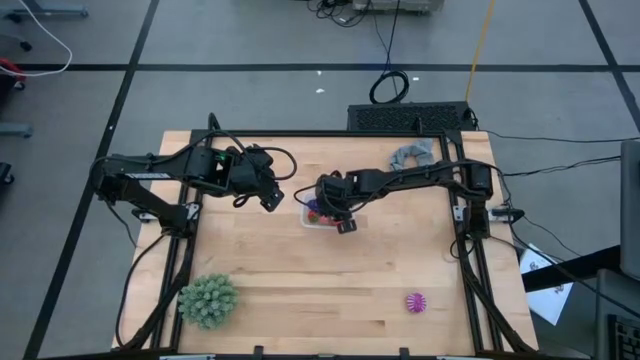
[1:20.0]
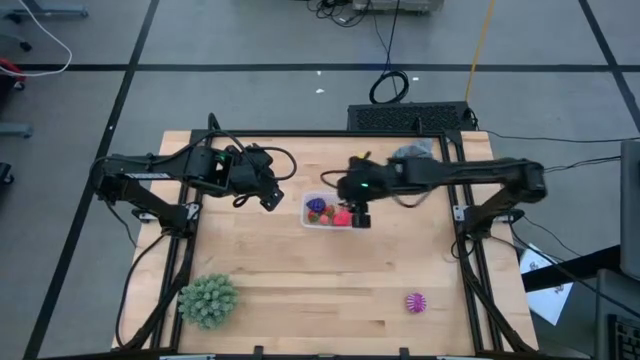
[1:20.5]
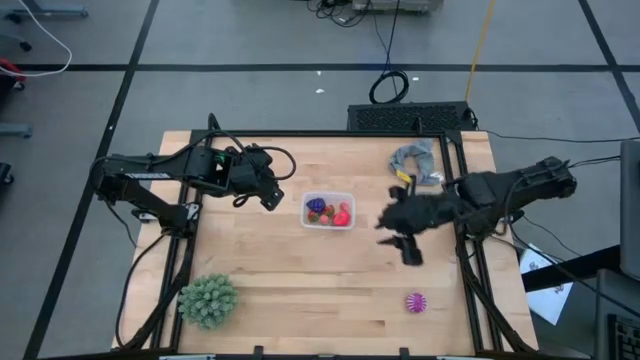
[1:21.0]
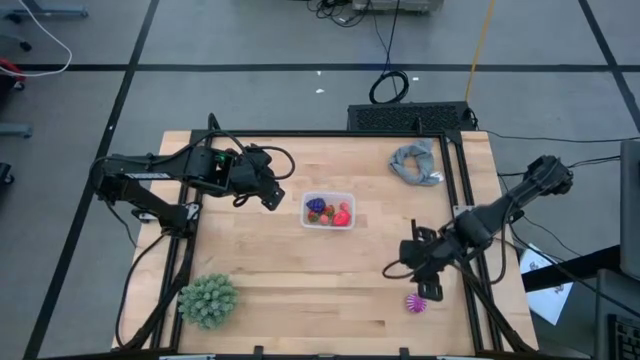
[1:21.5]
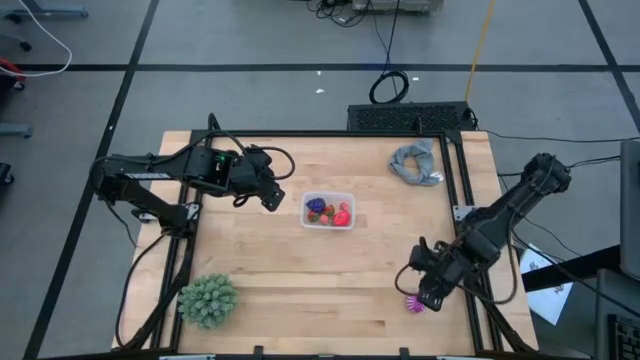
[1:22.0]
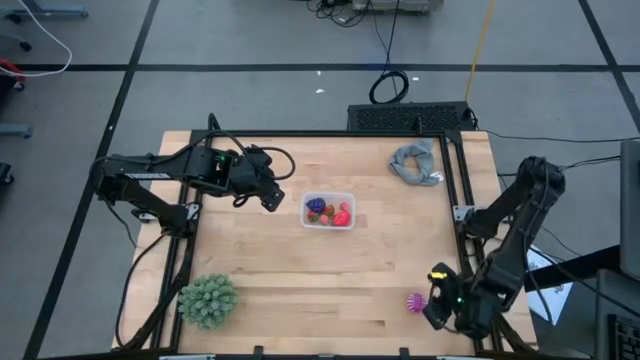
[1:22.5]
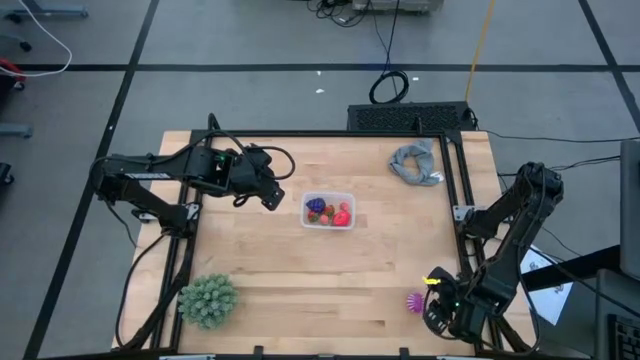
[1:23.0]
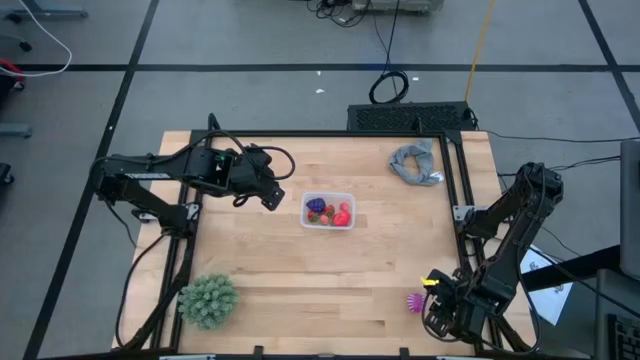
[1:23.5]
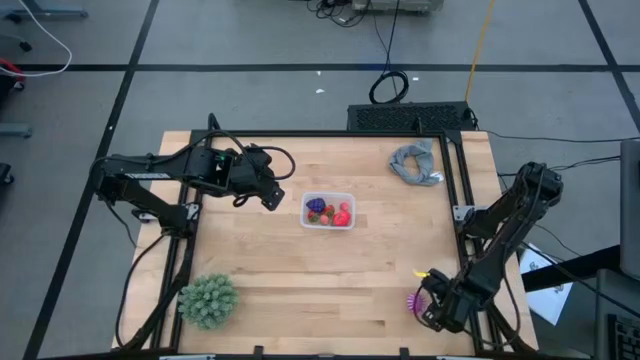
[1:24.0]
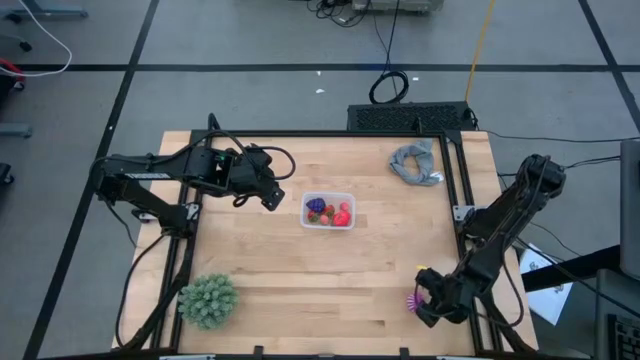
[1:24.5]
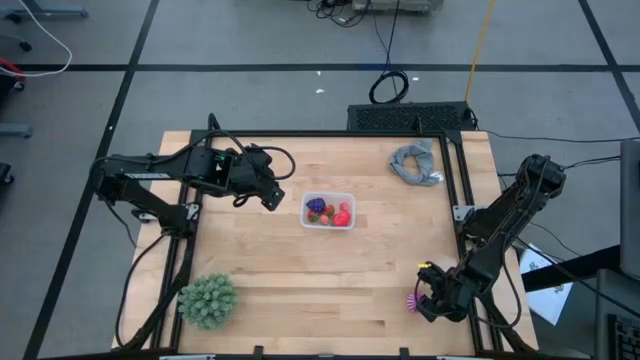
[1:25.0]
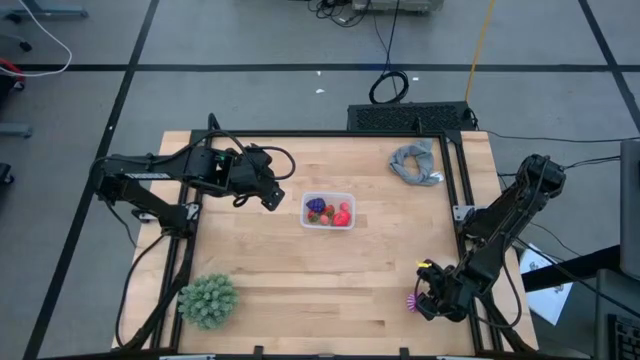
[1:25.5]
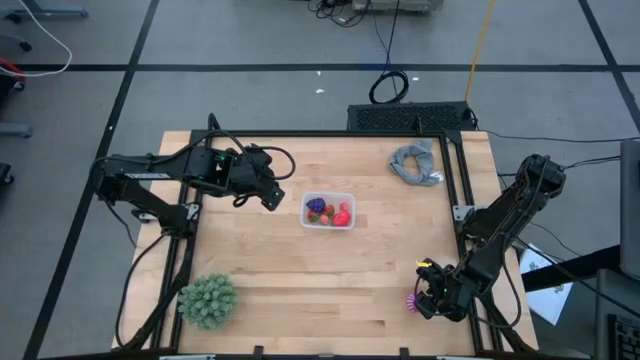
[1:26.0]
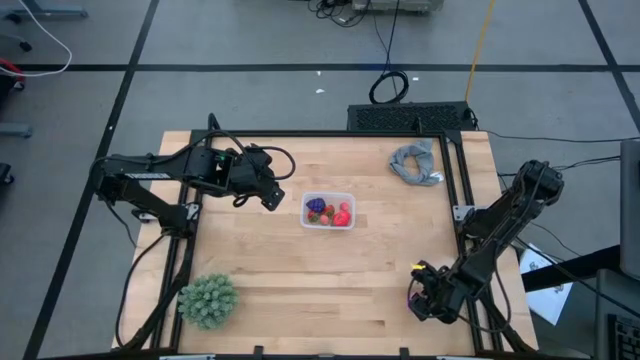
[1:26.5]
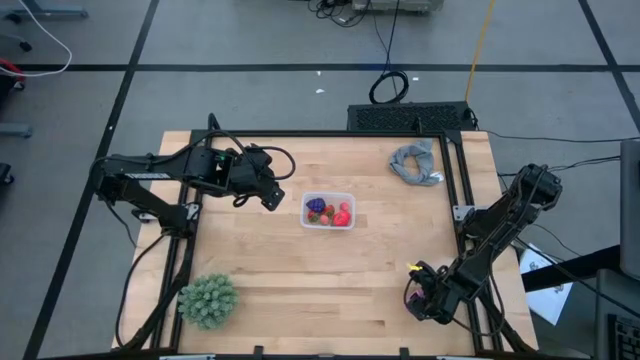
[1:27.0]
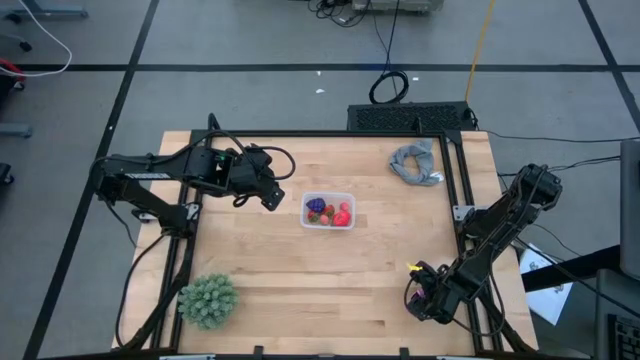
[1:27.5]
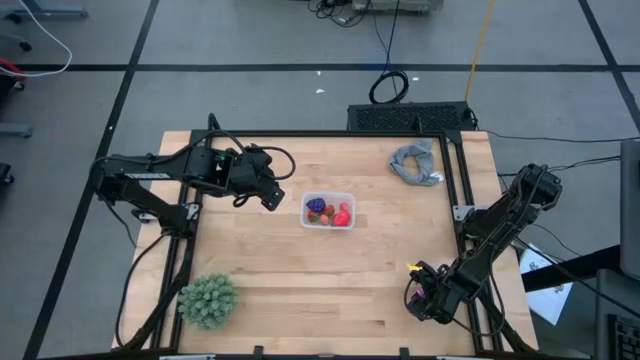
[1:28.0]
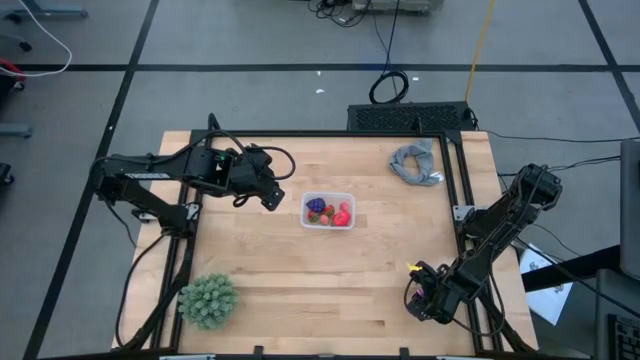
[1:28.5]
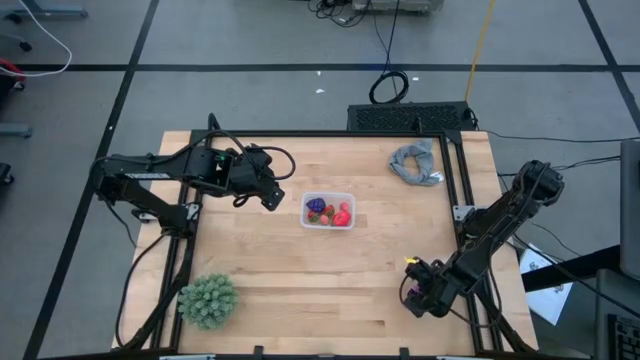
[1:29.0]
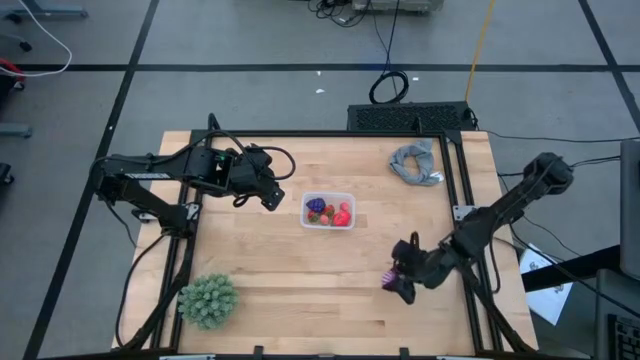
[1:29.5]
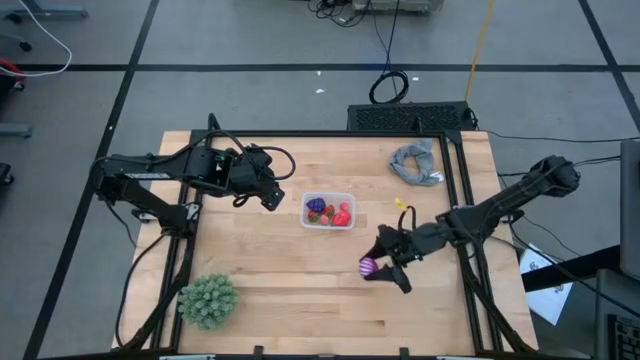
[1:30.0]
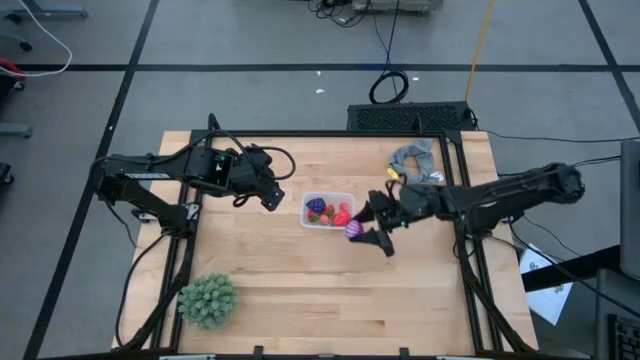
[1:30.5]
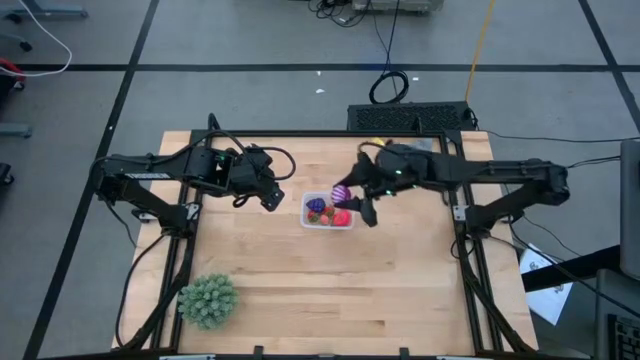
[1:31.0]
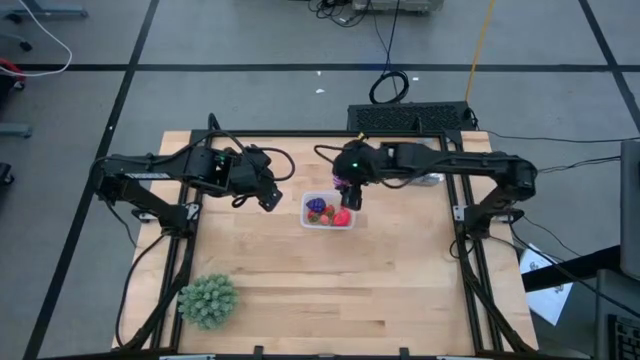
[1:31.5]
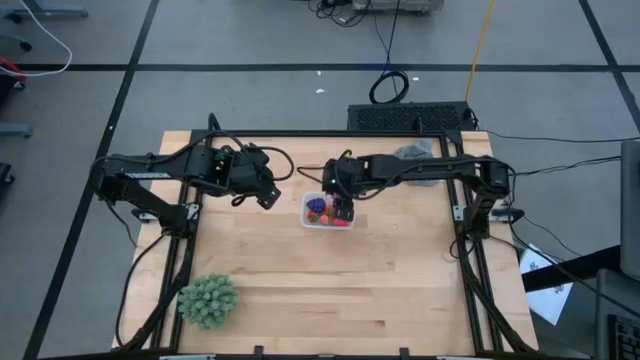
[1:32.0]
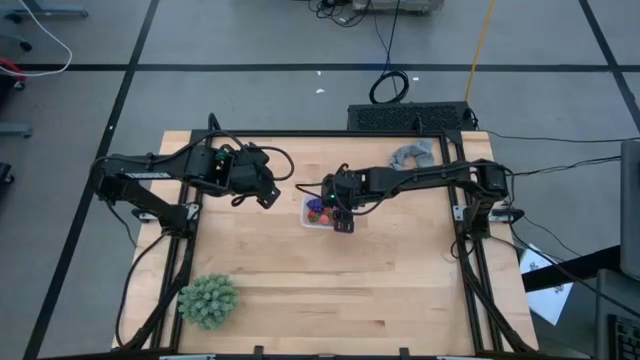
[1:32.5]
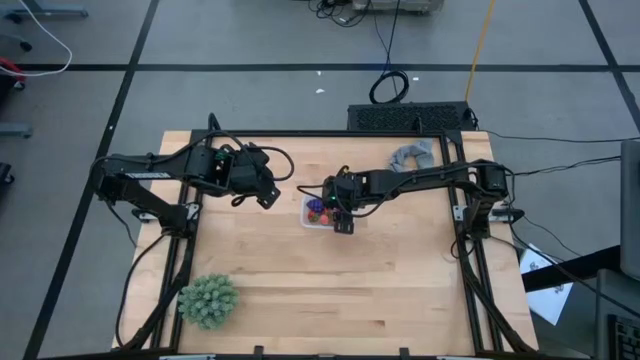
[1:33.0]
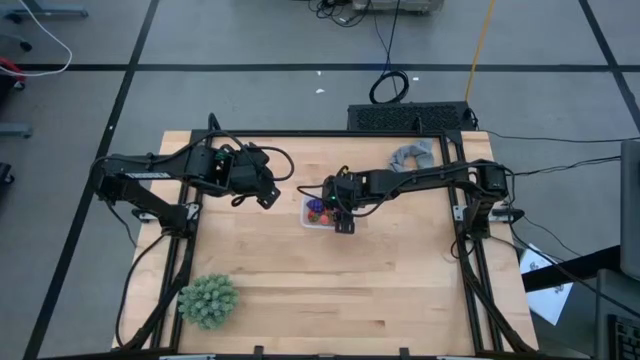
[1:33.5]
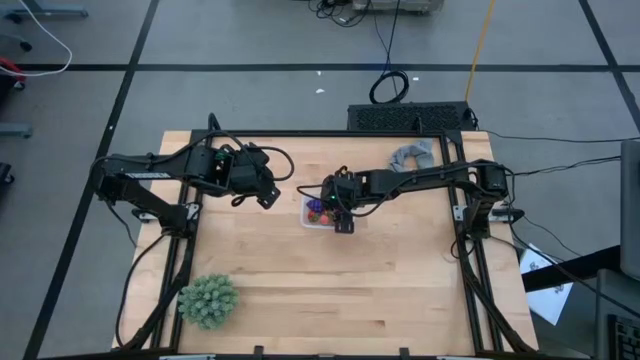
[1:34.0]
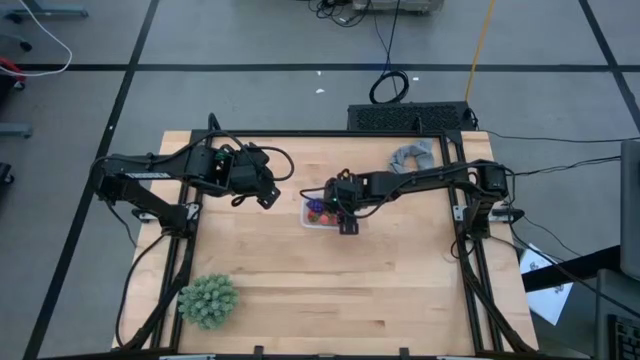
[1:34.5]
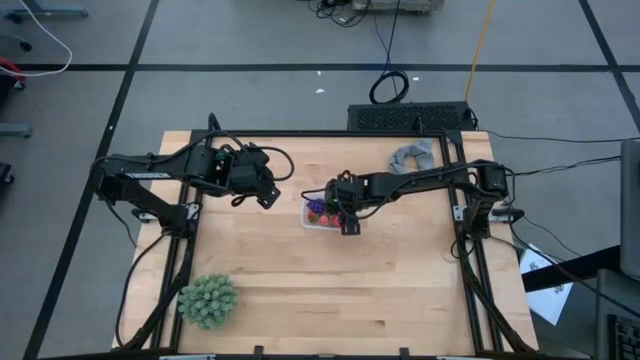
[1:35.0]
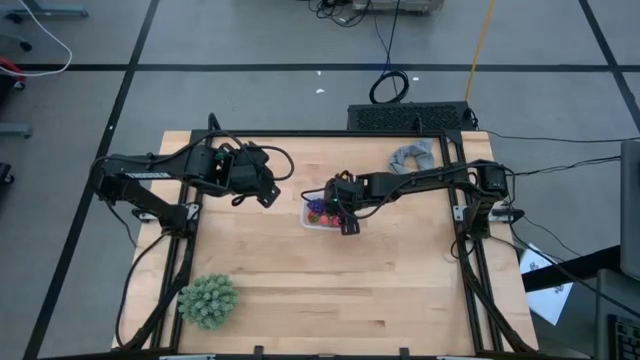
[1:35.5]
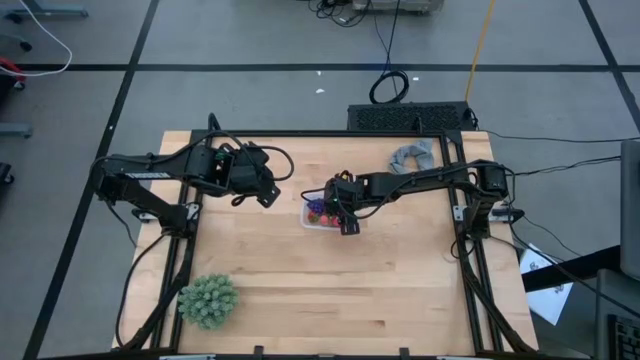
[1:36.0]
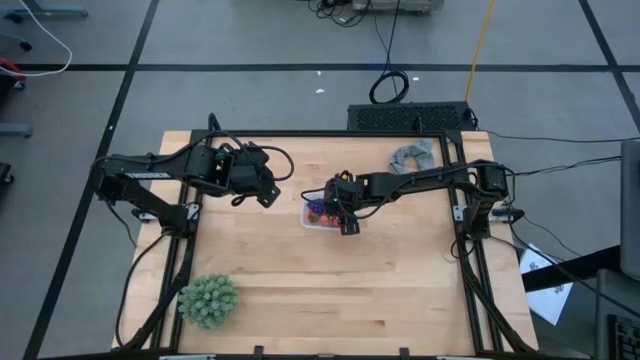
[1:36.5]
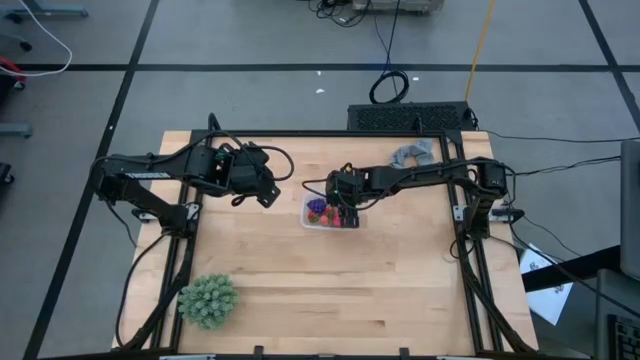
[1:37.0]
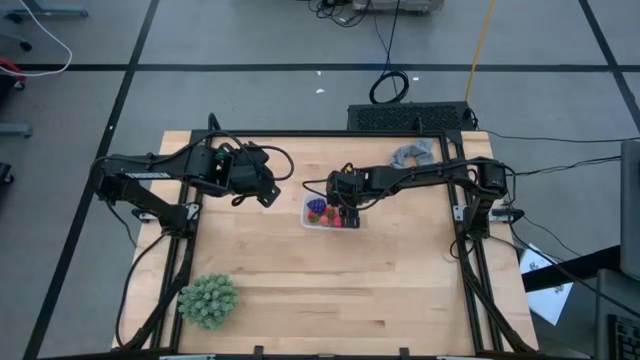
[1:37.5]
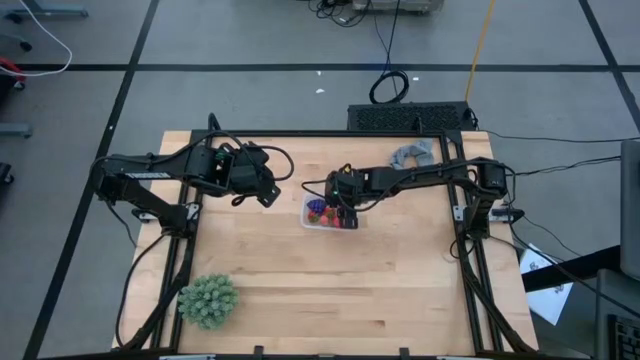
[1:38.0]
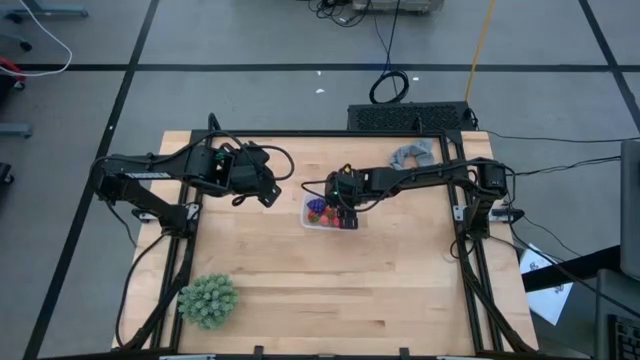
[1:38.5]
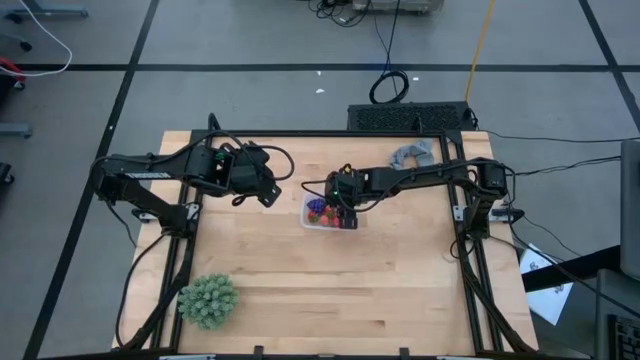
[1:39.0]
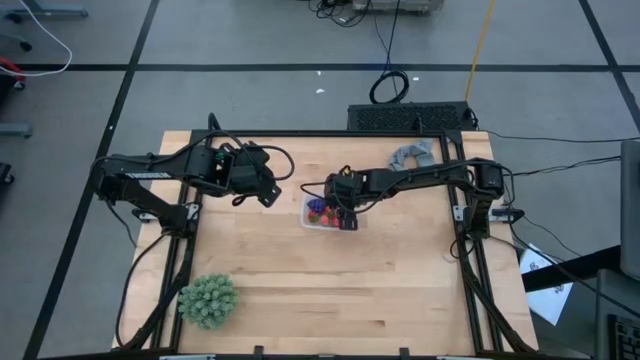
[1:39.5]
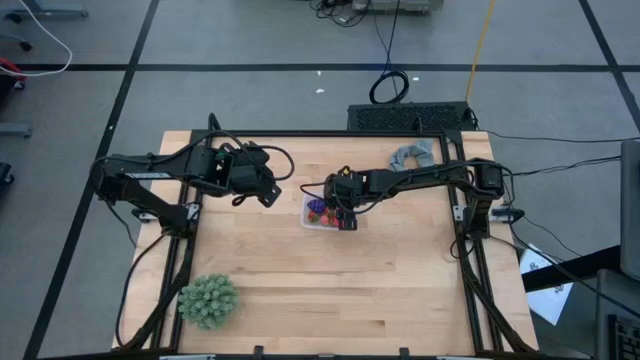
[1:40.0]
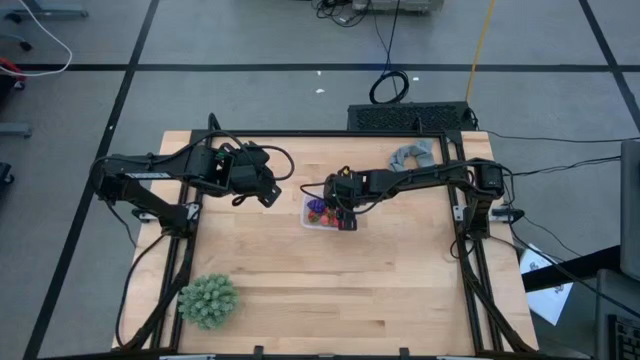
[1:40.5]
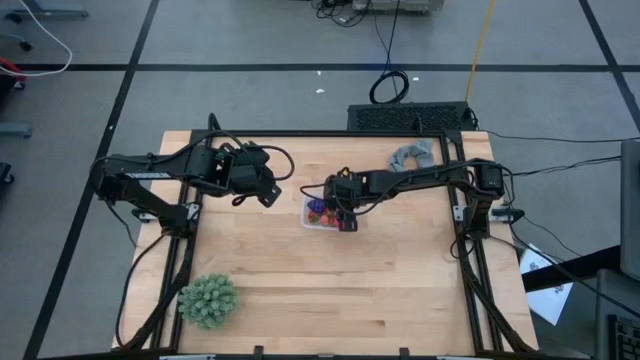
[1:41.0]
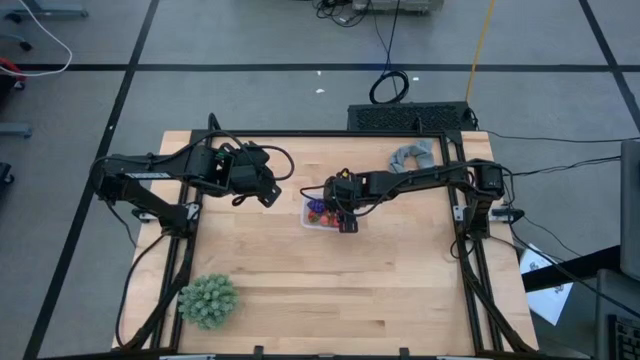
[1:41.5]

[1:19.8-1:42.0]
Task: Pick and placing Produce into tupperware
Put the onion into the transparent bin
